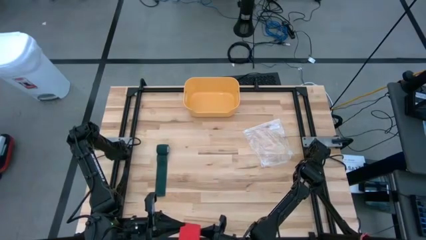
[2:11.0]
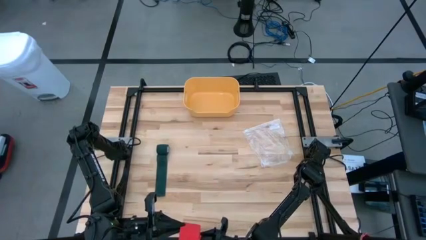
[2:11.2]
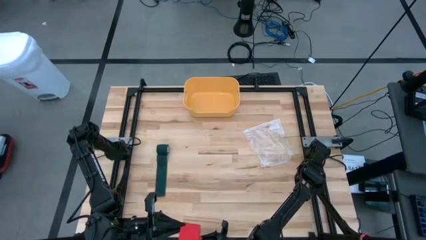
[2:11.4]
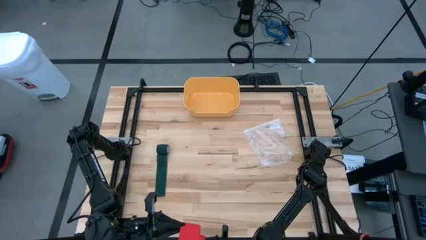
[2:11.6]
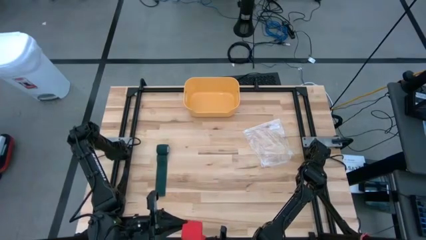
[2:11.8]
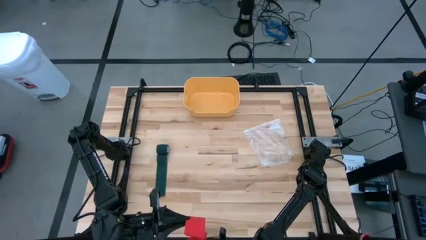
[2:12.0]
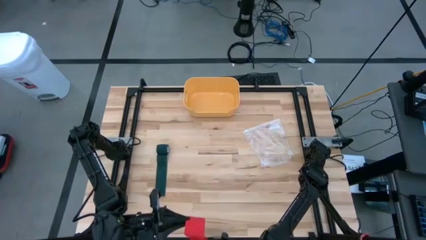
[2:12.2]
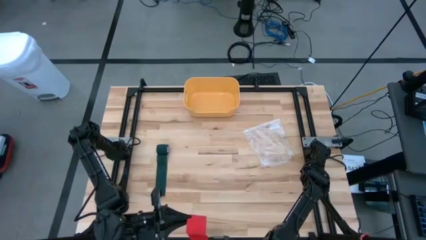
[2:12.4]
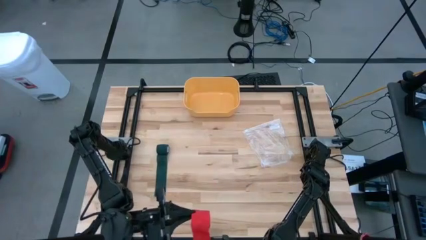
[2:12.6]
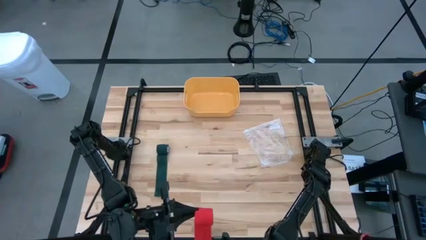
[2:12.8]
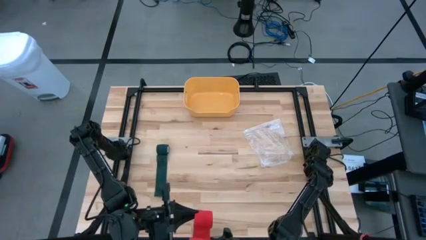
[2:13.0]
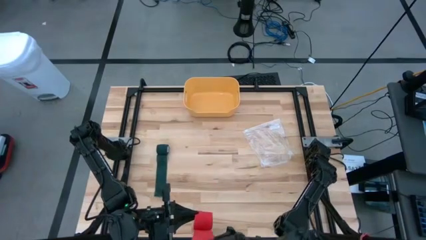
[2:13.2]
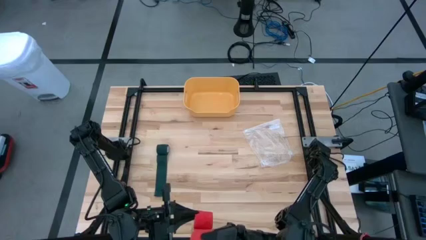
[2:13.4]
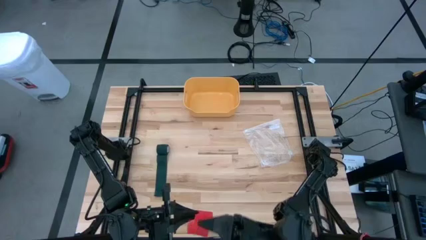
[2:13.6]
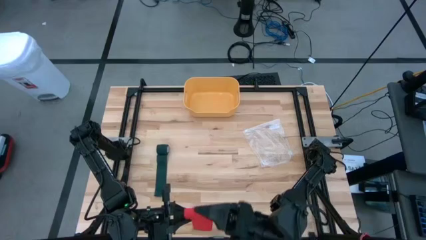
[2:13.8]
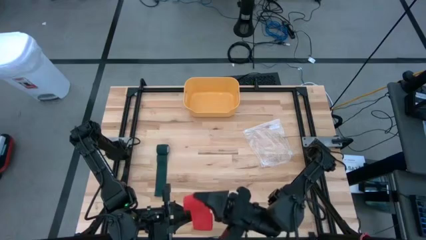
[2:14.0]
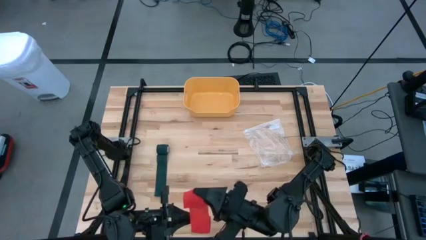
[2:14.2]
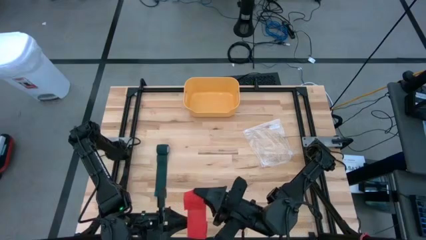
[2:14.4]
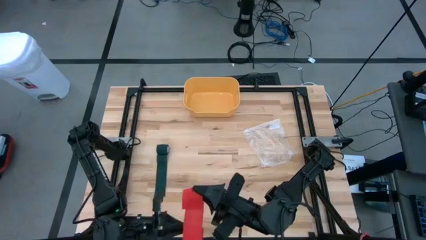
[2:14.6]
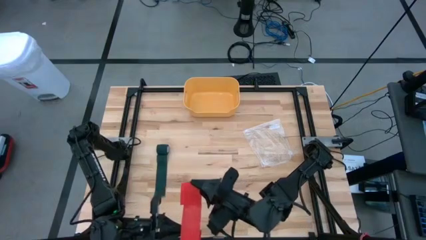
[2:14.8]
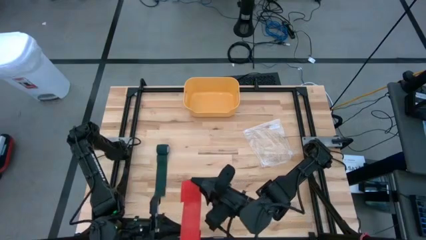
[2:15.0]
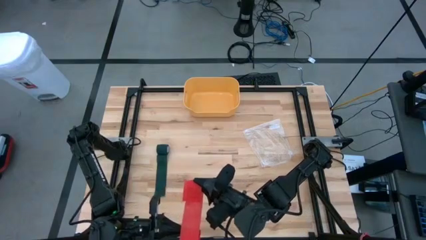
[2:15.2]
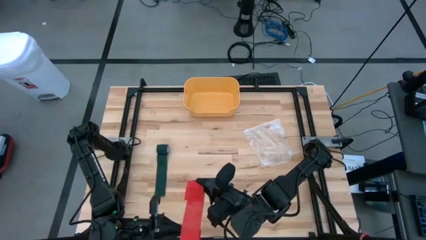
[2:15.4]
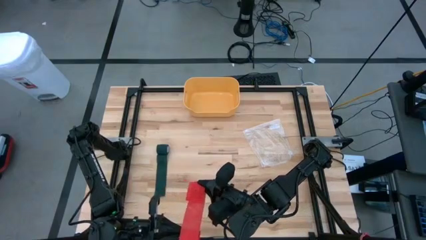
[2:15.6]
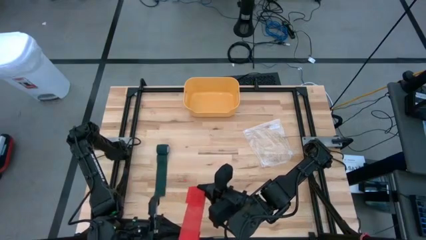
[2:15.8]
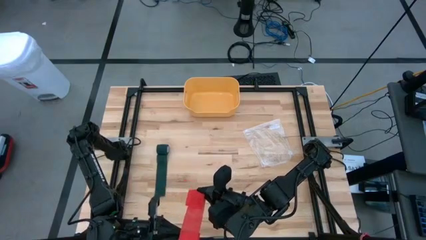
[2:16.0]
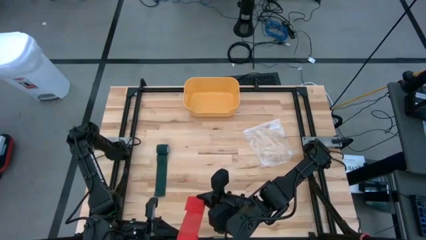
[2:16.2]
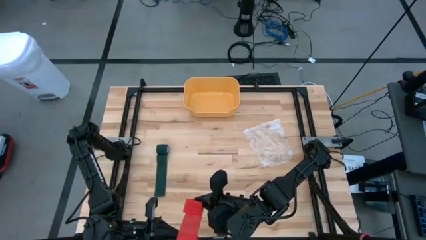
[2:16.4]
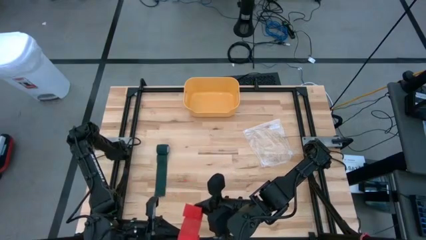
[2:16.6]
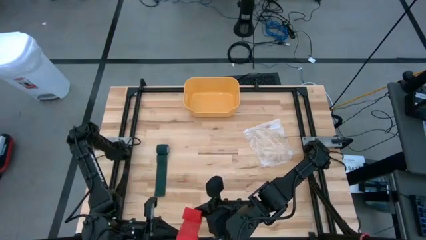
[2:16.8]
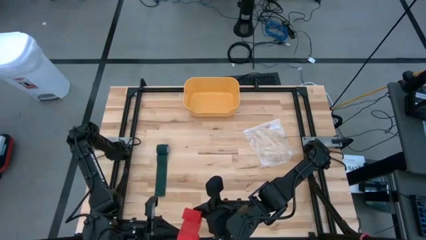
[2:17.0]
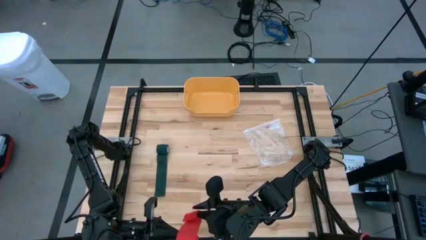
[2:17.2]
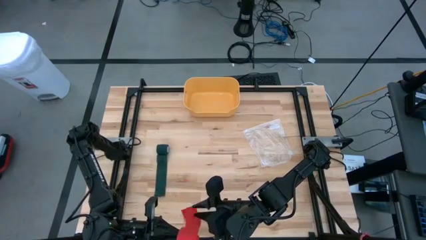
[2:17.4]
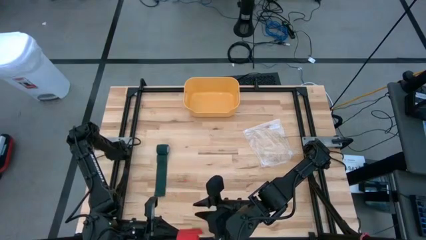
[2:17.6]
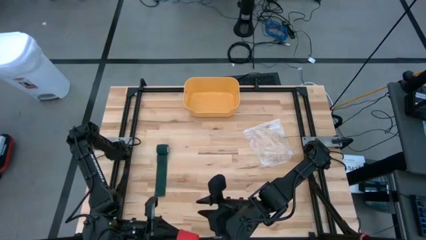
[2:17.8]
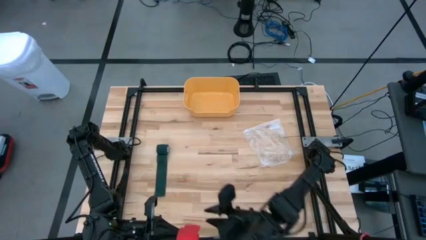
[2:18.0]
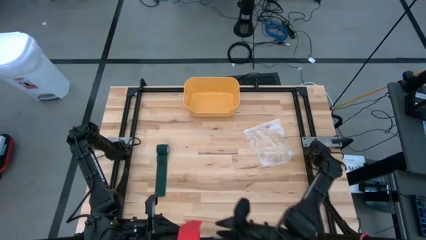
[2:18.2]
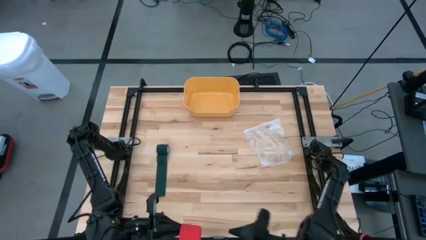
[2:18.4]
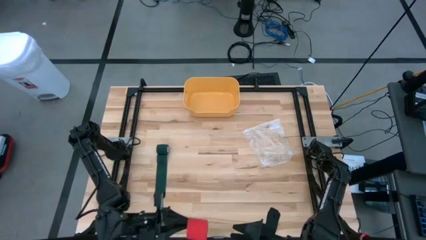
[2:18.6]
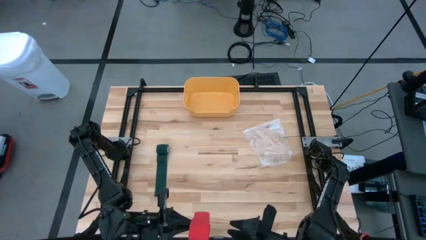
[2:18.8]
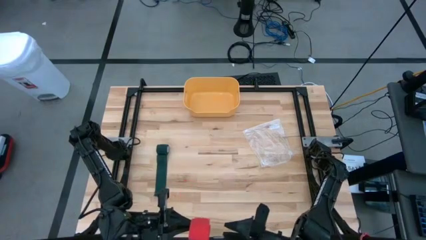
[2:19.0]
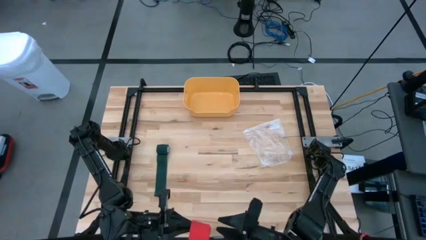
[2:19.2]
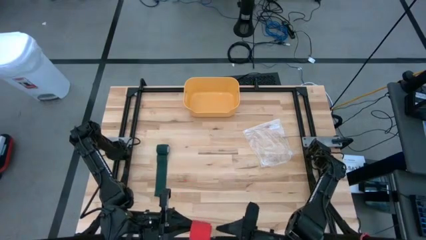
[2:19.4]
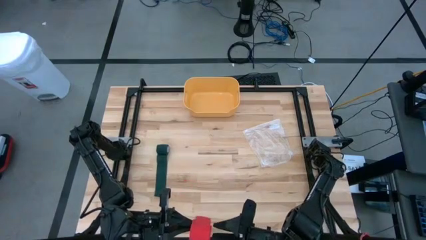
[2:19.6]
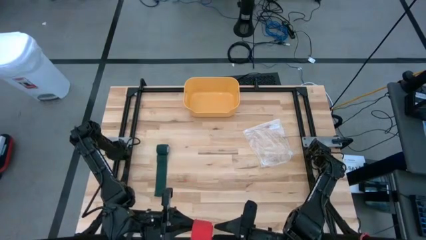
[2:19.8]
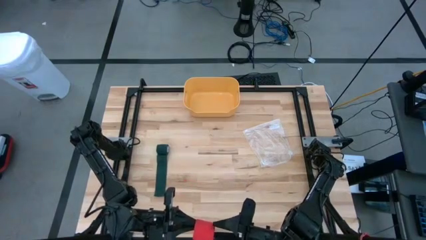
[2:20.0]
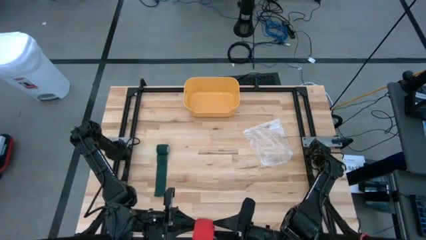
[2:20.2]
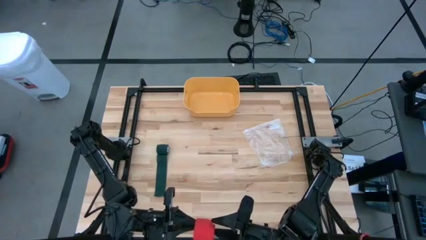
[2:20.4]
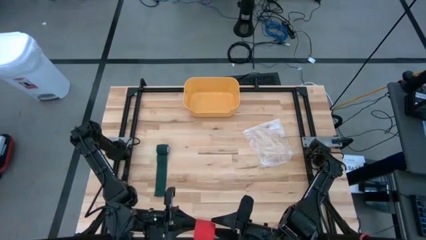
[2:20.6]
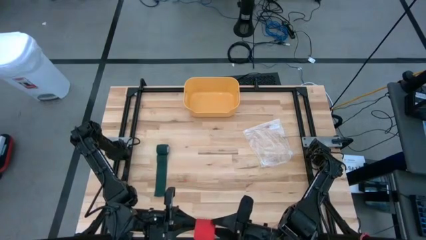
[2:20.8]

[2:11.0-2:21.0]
Task: Roll bandage
Roll the red bandage

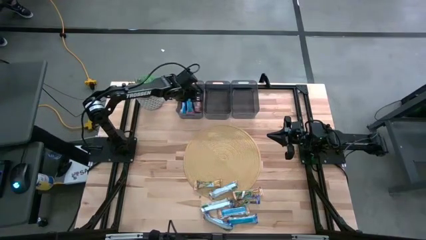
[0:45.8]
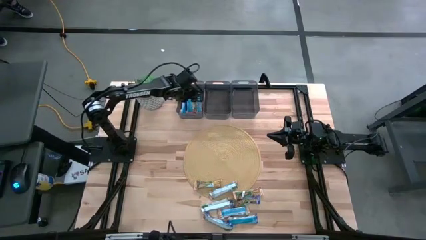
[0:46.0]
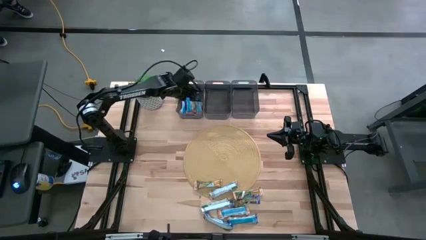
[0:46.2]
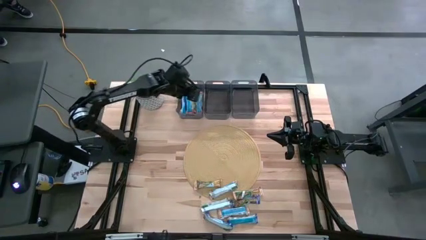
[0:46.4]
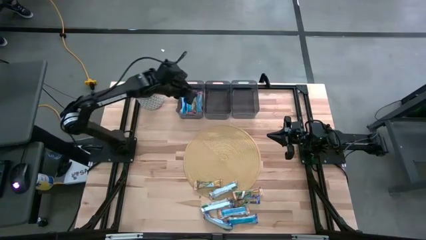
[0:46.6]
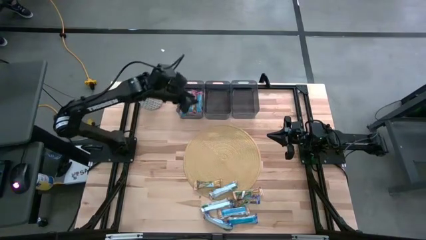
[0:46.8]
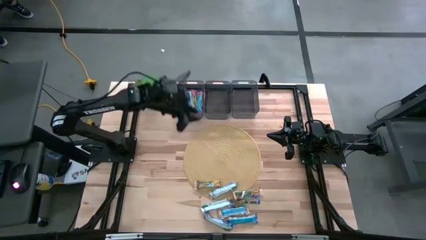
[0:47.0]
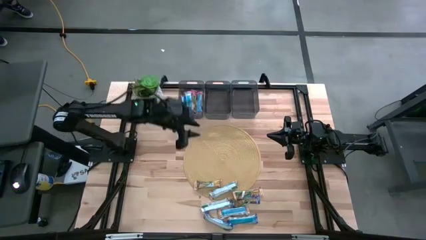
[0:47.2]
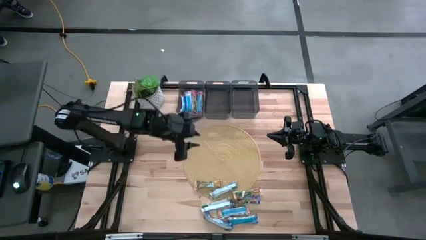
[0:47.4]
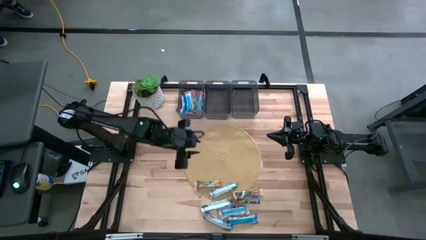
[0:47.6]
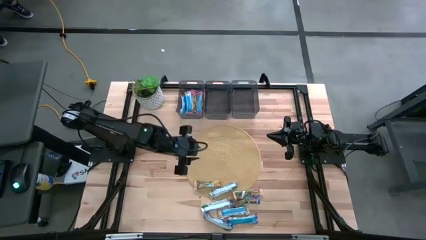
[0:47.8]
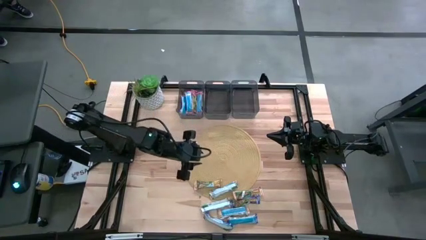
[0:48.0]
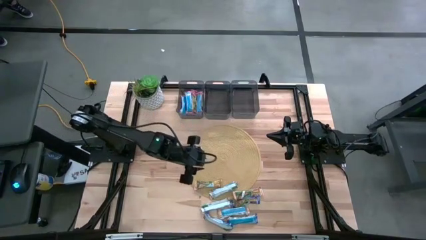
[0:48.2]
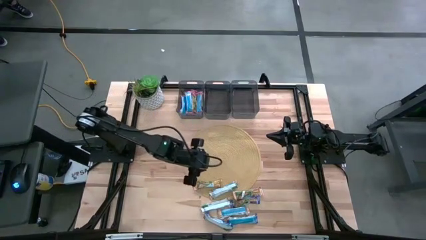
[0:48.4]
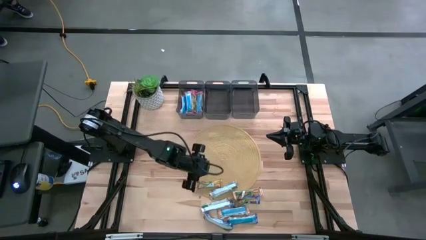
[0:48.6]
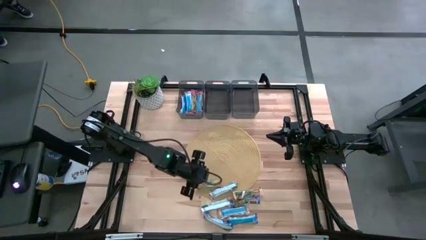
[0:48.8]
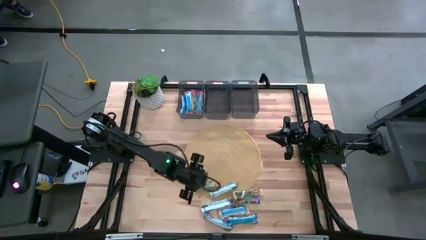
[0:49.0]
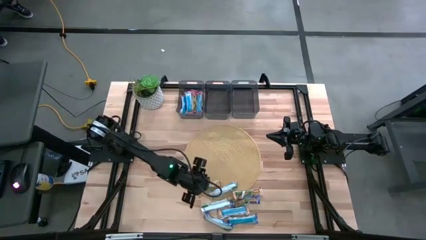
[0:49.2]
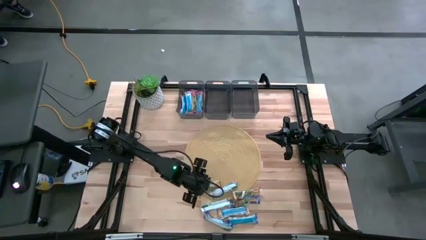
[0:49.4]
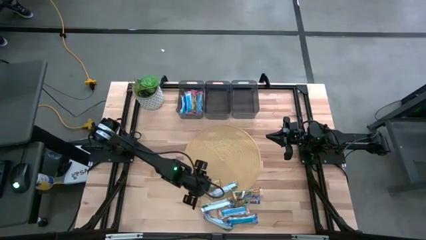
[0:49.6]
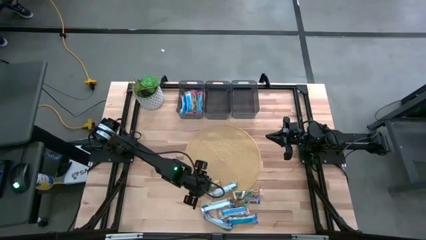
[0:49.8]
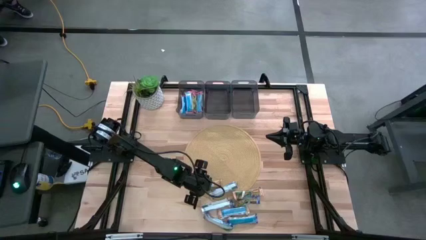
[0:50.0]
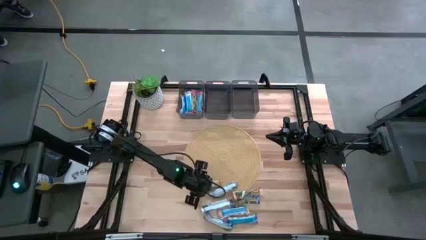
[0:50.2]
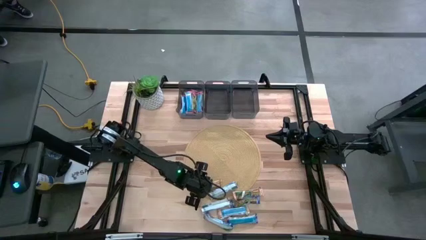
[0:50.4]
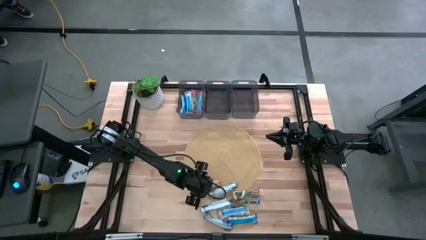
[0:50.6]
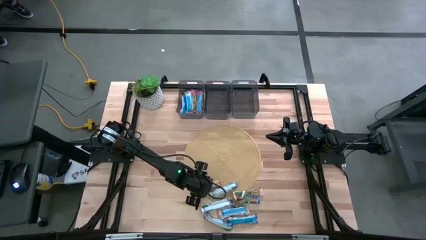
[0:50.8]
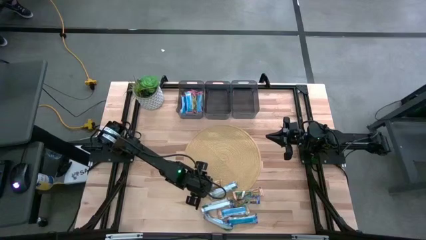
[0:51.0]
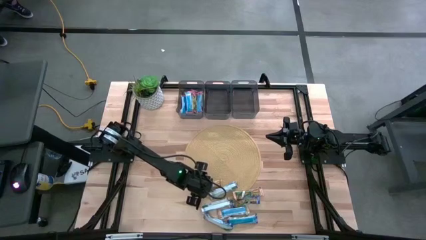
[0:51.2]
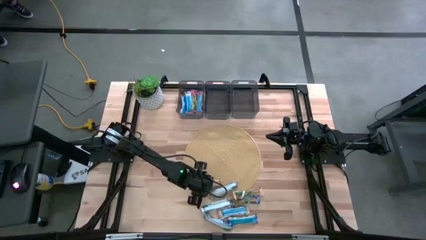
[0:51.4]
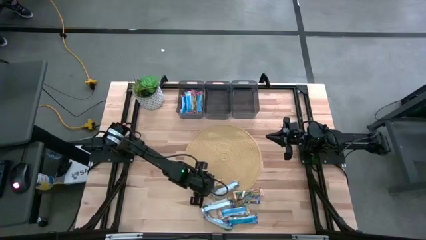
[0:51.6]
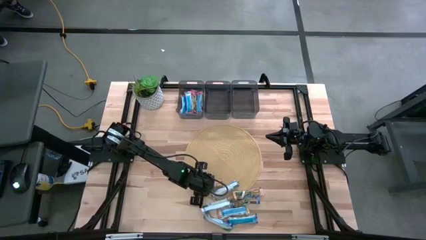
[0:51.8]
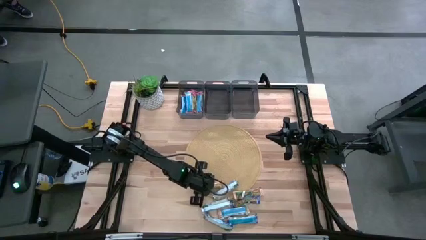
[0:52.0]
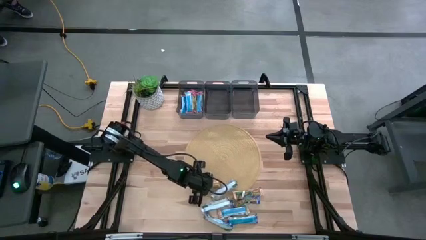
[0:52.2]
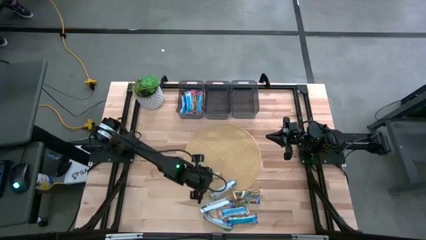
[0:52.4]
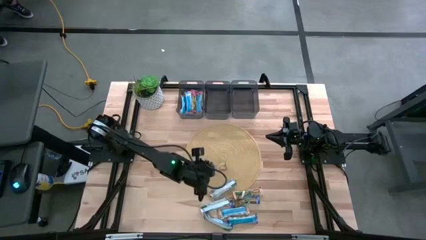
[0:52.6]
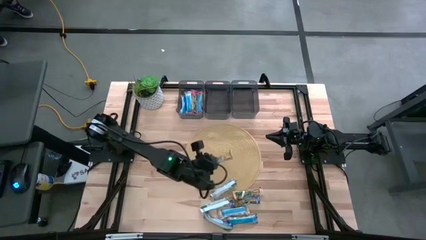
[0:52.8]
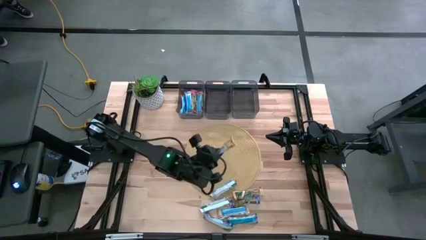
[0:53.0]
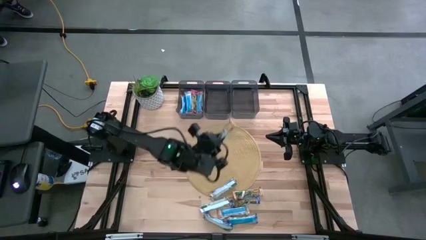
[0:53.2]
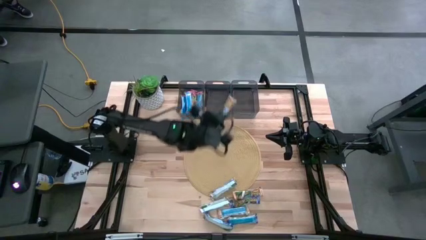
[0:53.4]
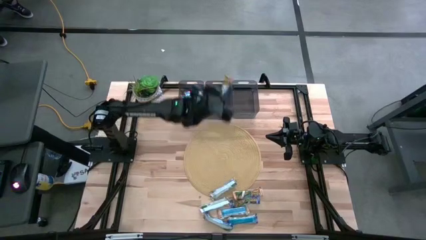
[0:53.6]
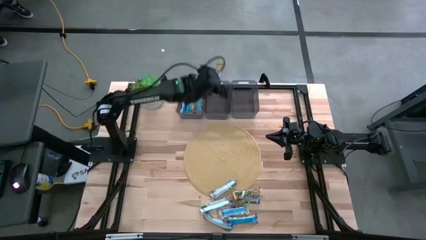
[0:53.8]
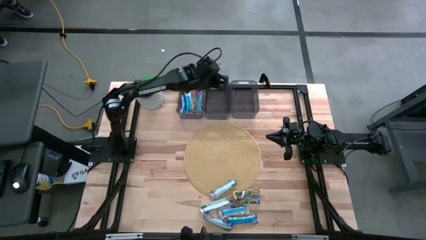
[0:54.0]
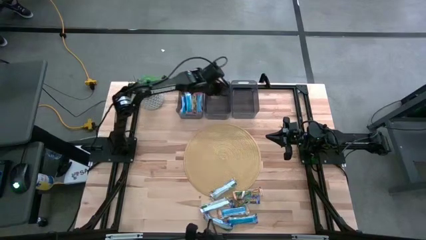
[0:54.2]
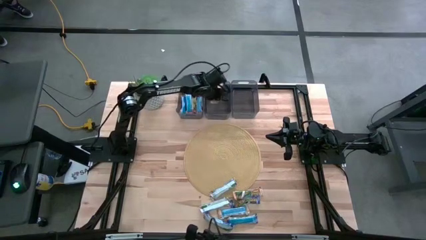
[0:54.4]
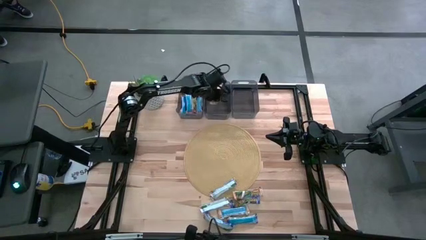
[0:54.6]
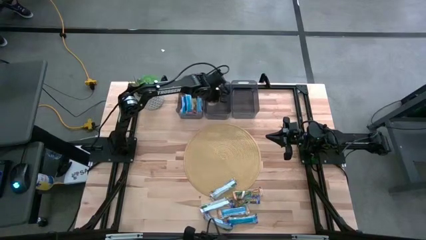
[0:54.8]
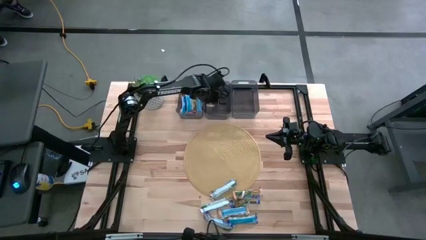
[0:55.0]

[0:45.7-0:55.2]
Task: Pick and place Granola Bars by type
Put the orange granola bar into the center black bin
